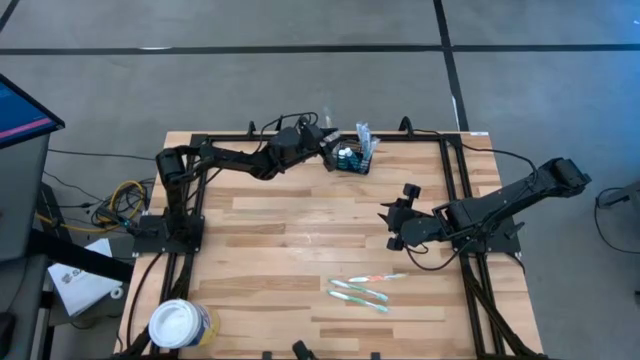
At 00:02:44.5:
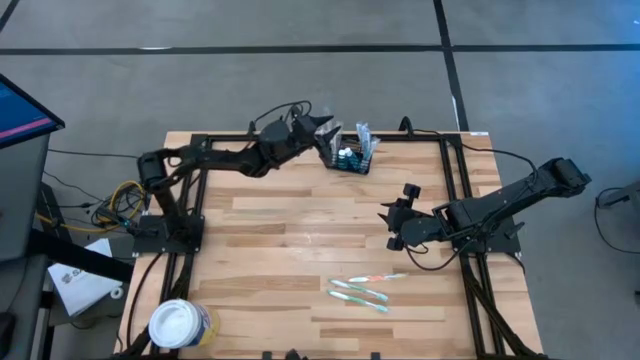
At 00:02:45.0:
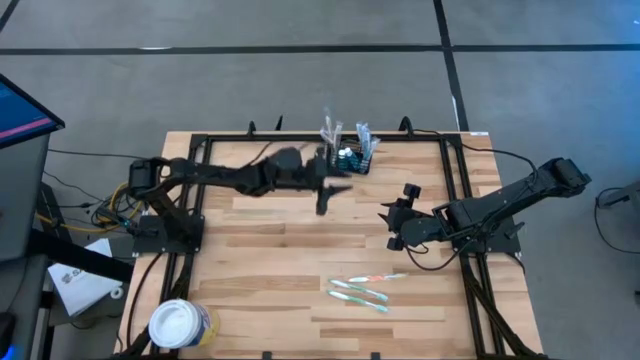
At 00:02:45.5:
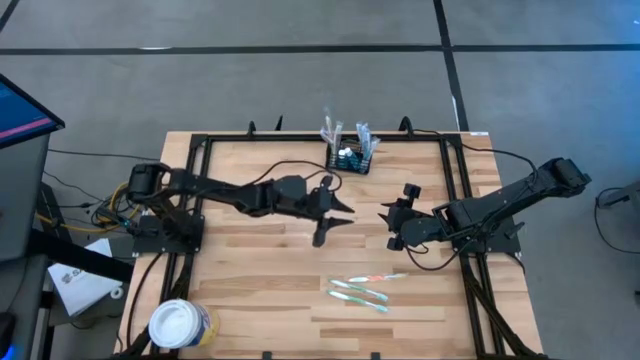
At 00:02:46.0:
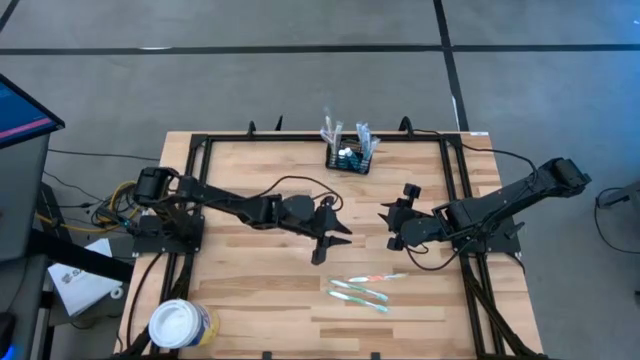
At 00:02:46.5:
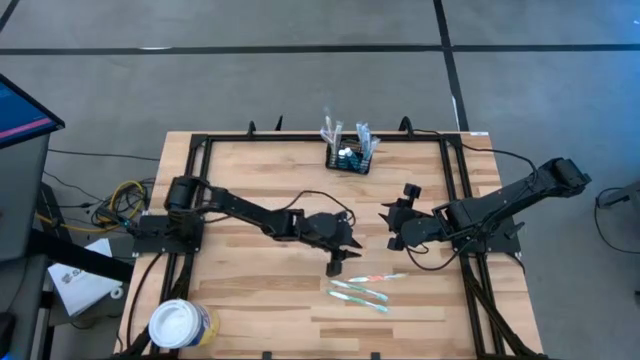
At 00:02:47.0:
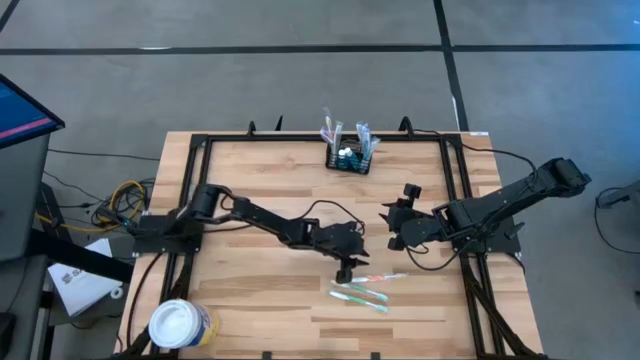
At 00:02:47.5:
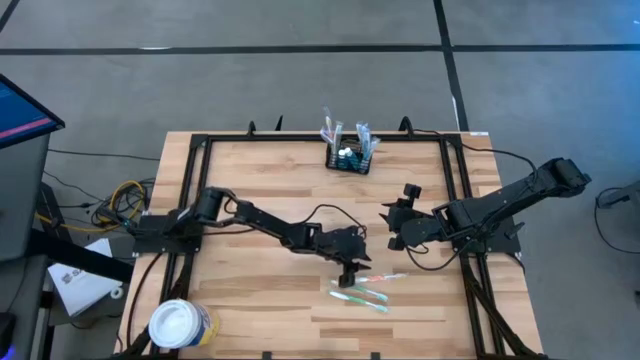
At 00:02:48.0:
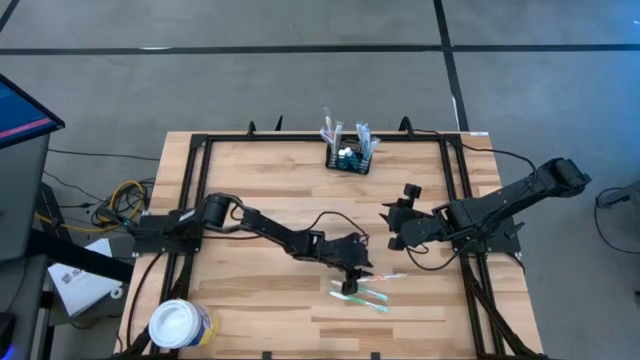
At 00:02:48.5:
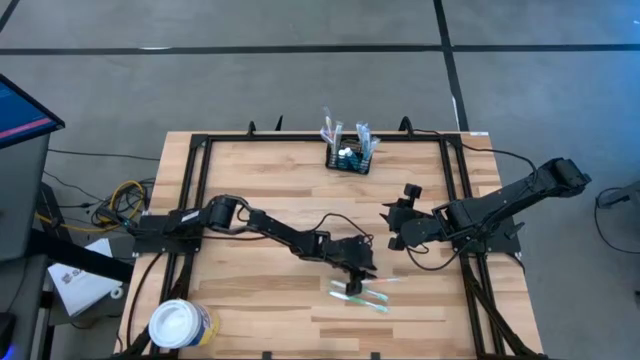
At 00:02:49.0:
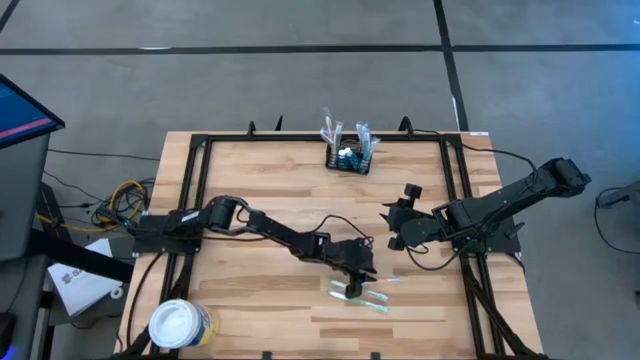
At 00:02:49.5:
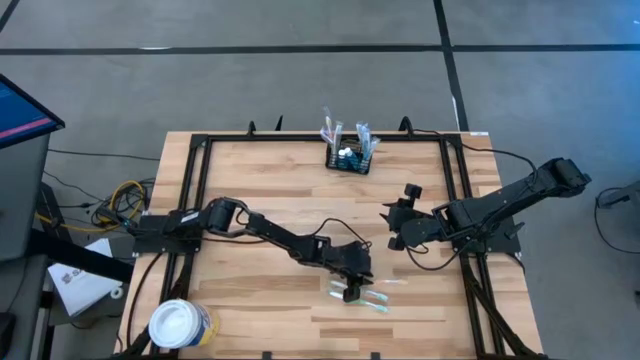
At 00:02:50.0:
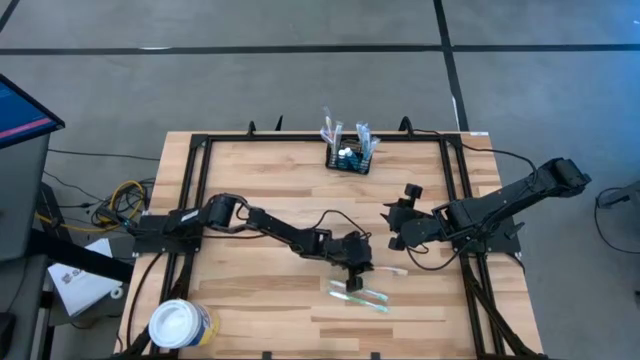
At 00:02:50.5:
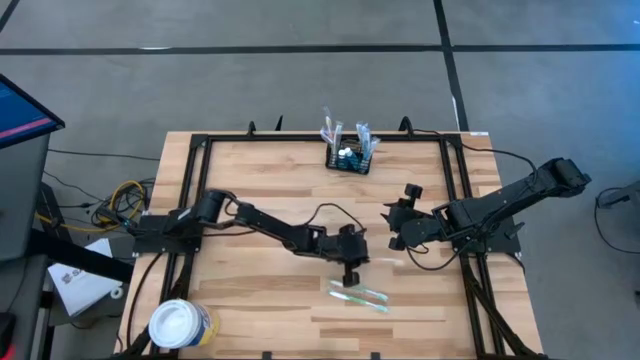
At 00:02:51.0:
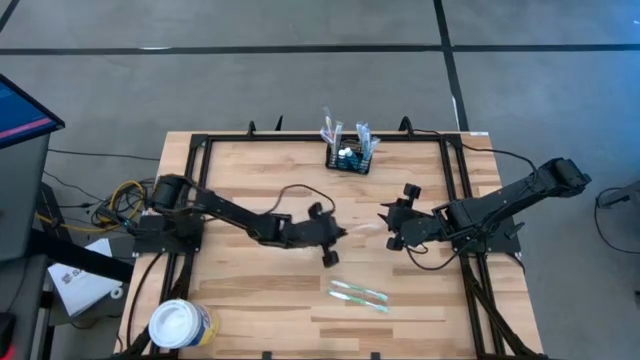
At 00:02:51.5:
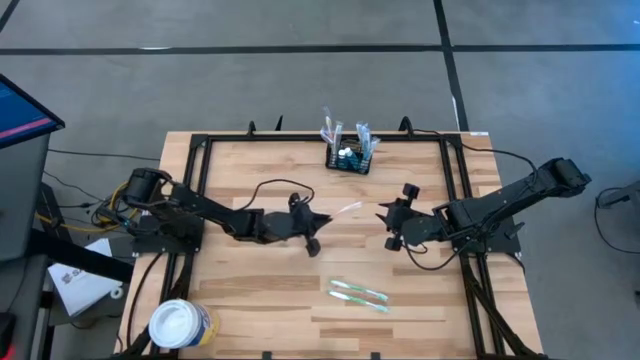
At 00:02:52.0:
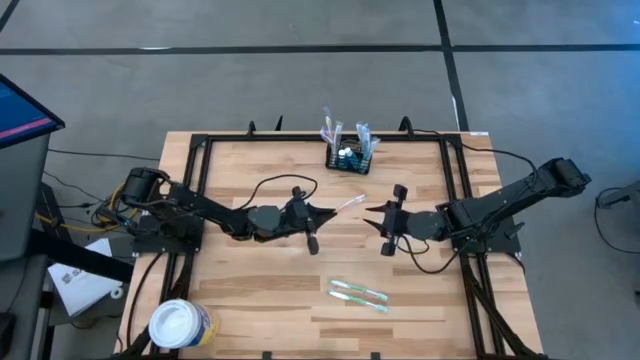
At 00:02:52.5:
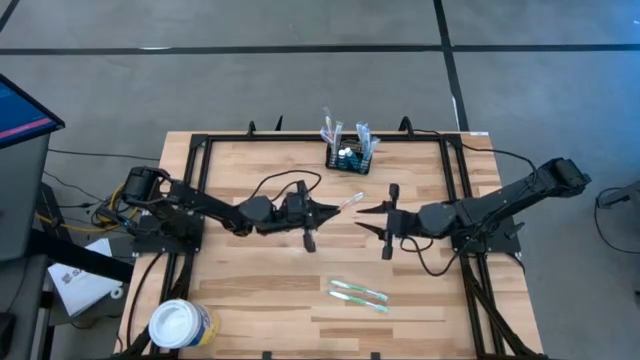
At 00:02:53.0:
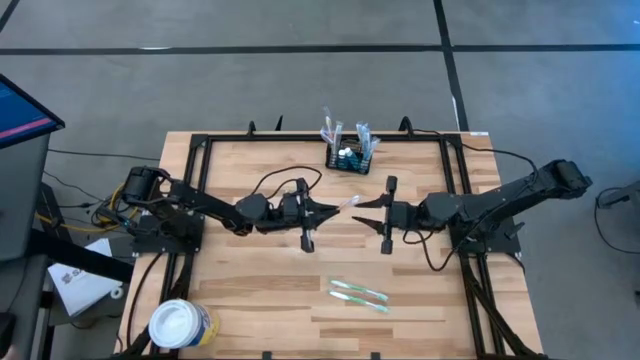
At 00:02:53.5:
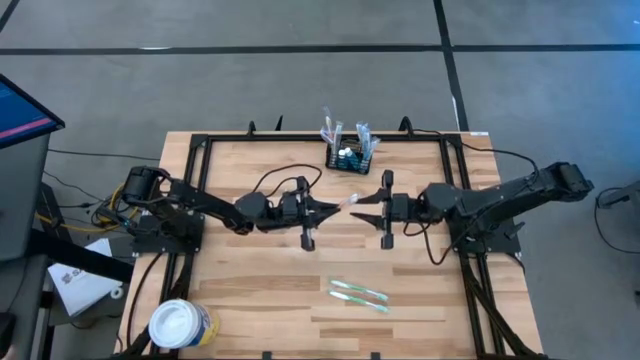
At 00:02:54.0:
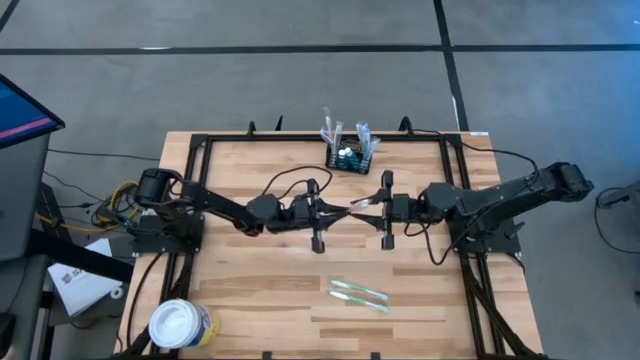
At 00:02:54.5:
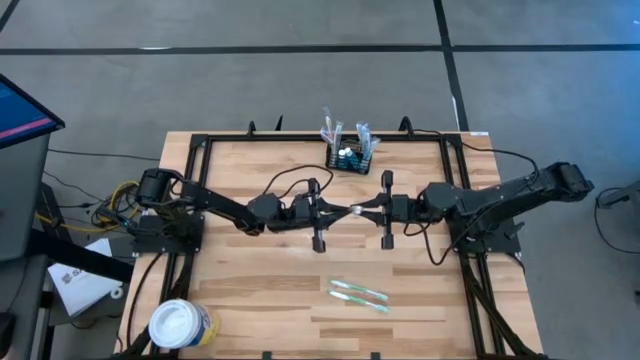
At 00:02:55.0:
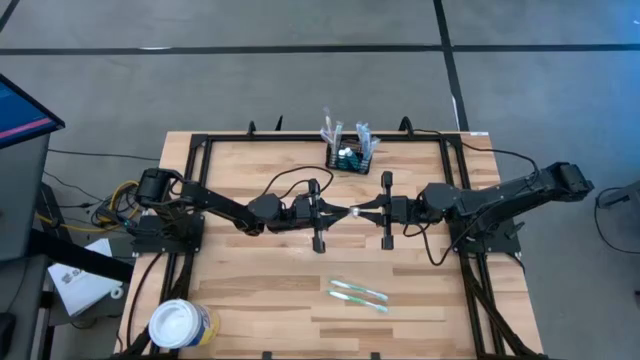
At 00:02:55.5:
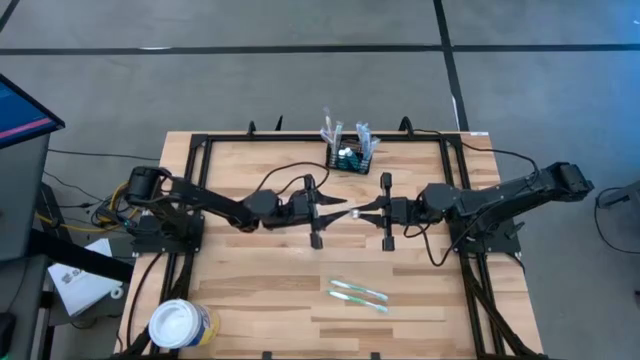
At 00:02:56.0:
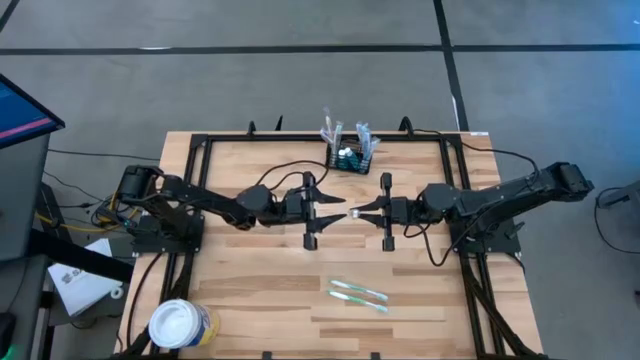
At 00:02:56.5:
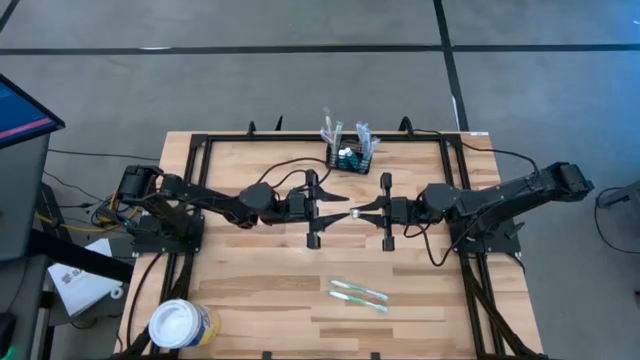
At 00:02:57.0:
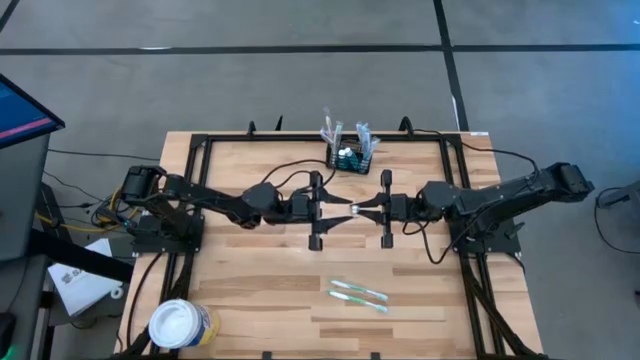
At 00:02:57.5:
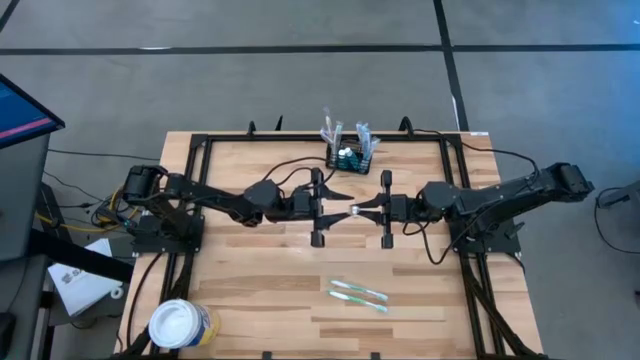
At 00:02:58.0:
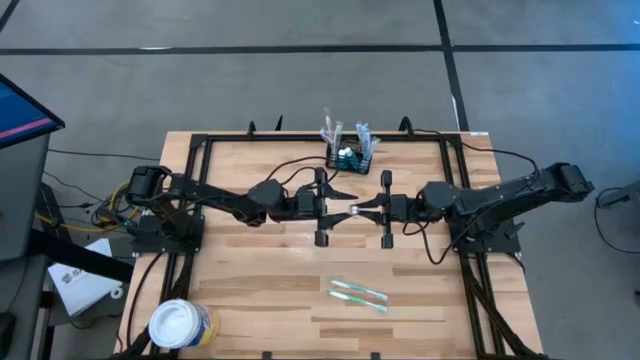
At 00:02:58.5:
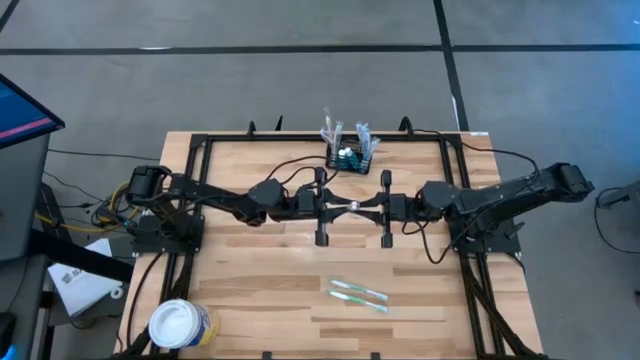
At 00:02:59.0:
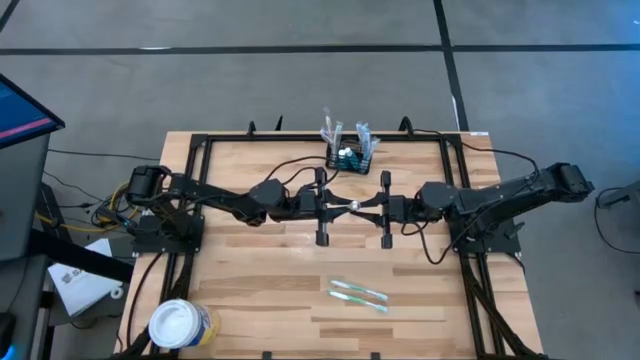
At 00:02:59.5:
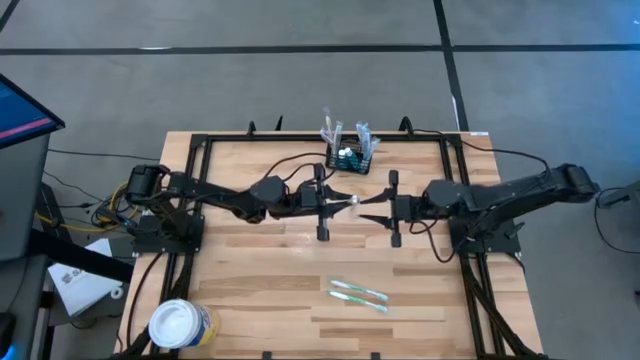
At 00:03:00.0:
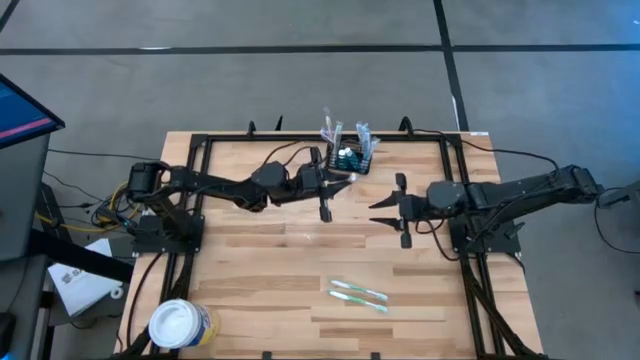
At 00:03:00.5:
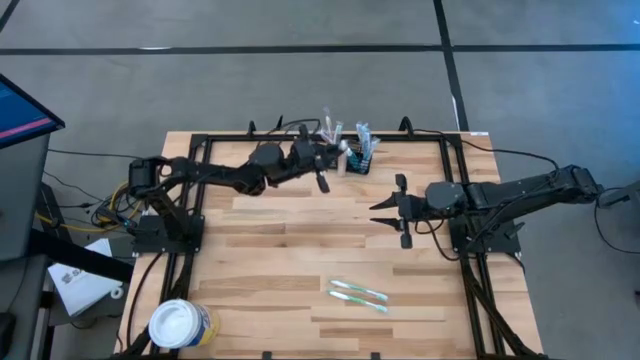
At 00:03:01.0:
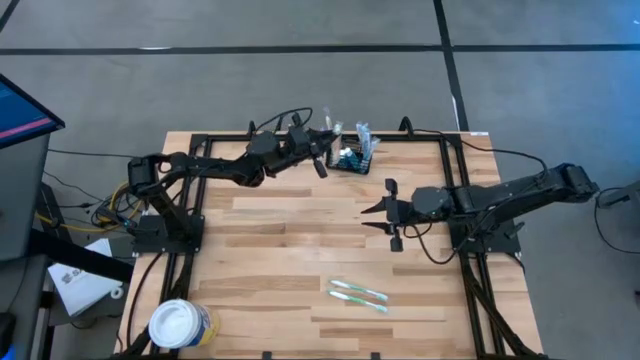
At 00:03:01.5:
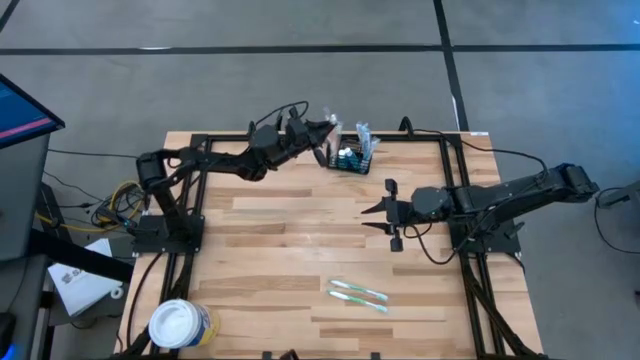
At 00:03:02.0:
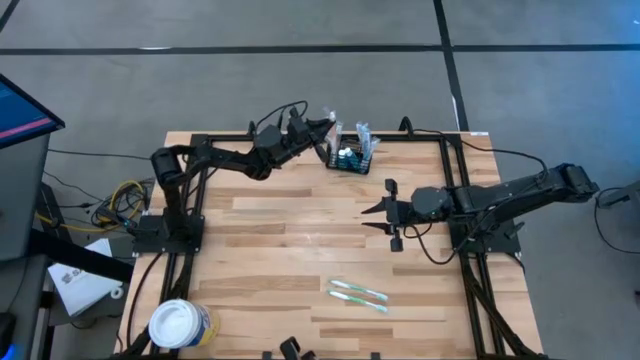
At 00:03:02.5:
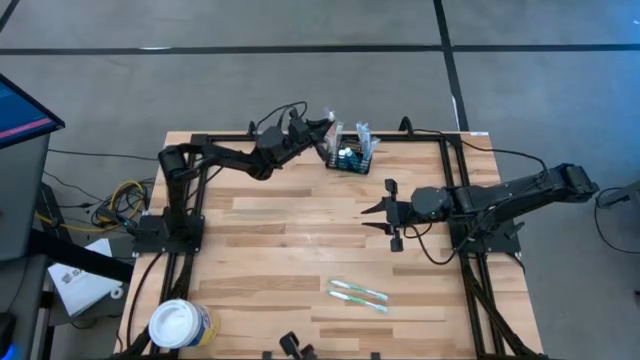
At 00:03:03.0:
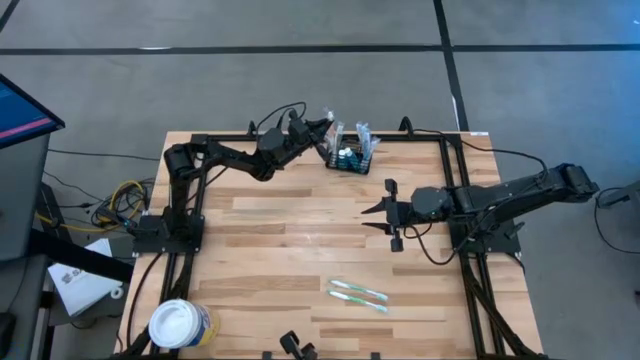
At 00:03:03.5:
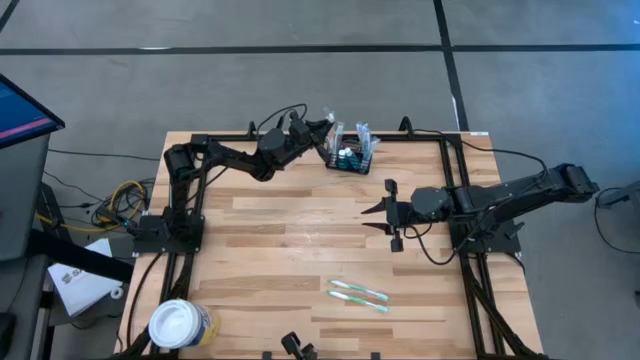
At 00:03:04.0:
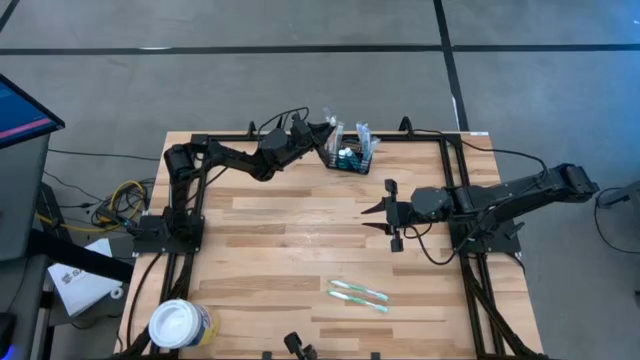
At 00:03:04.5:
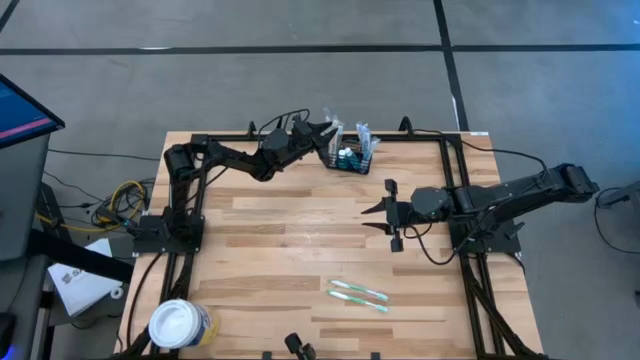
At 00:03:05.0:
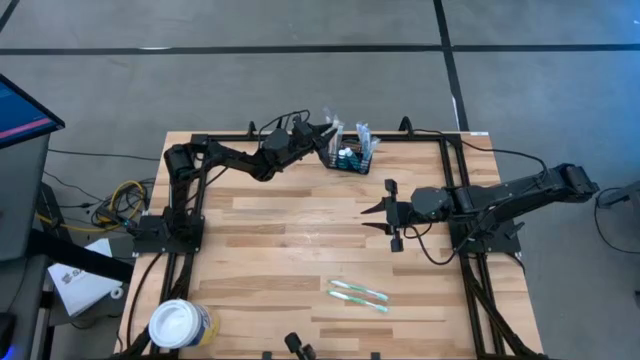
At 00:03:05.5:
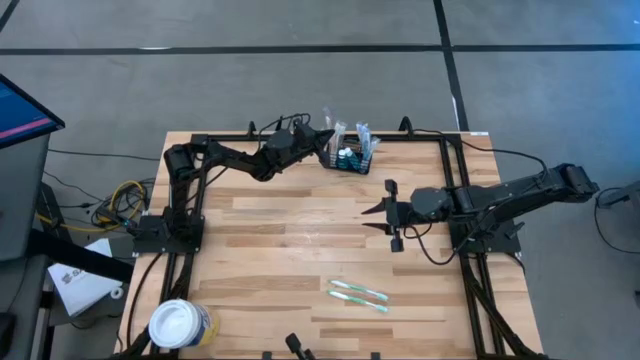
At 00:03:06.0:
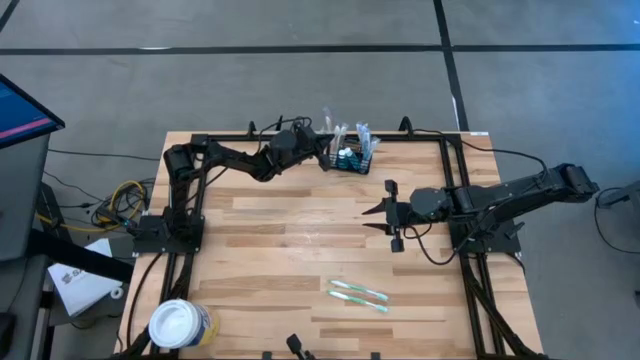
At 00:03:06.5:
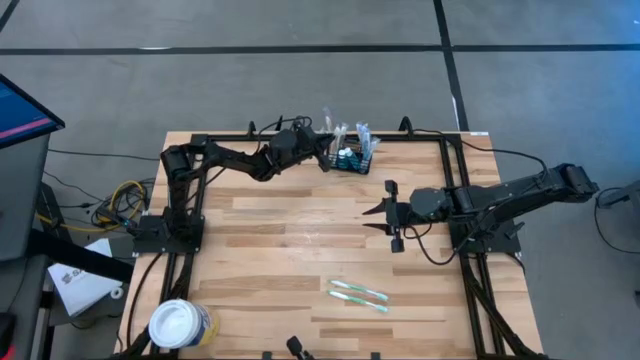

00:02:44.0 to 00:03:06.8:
Task: Pick & Place toothbrushing station
Put the orange toothbrush into the mesh organizer
